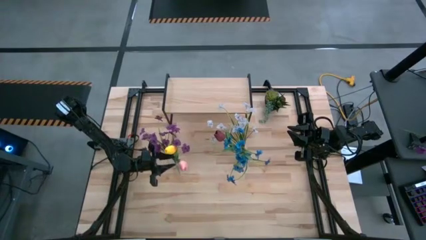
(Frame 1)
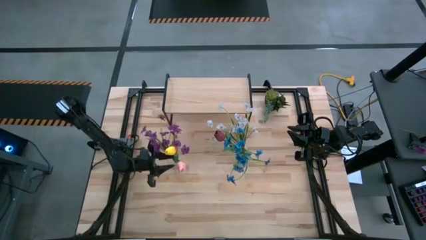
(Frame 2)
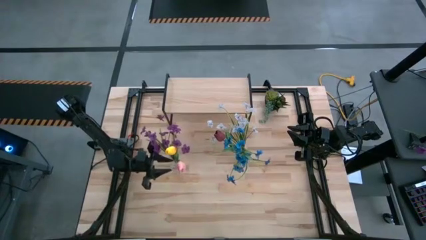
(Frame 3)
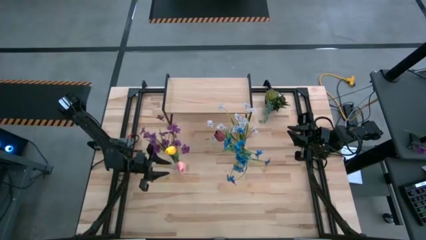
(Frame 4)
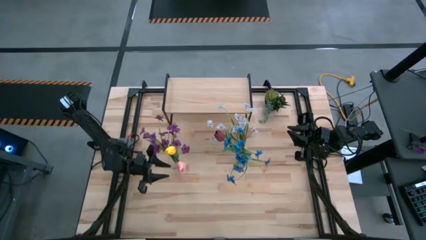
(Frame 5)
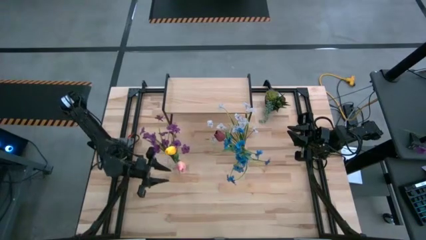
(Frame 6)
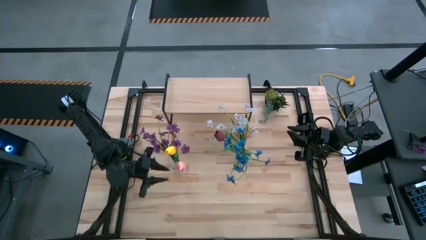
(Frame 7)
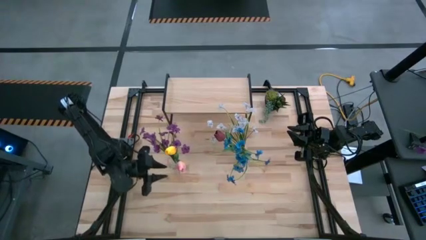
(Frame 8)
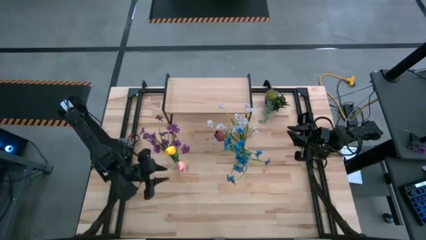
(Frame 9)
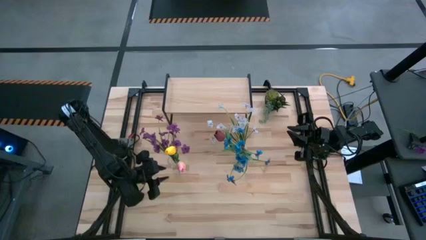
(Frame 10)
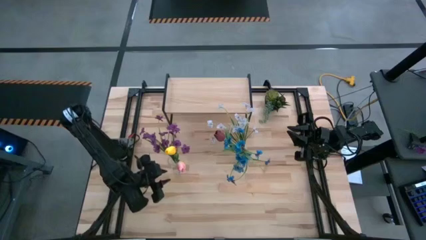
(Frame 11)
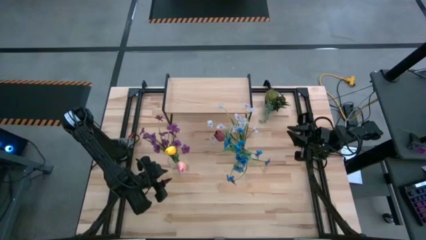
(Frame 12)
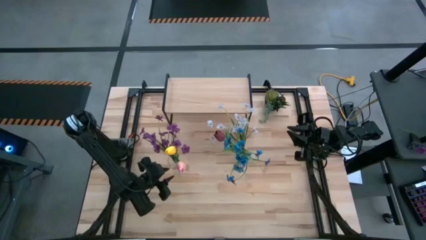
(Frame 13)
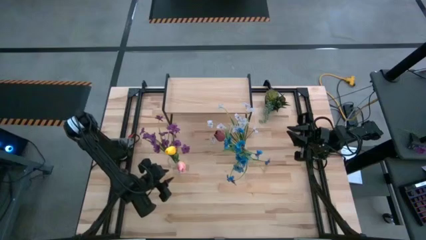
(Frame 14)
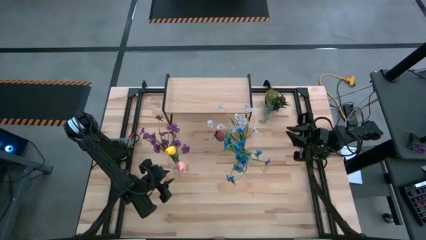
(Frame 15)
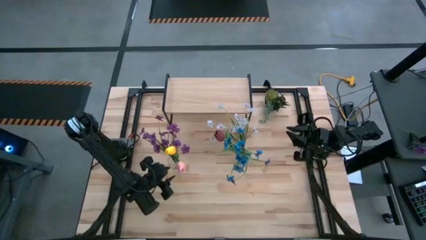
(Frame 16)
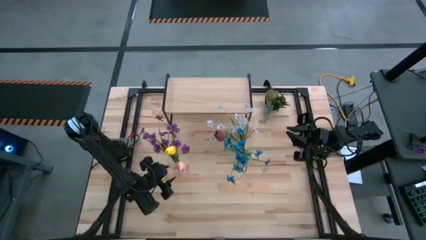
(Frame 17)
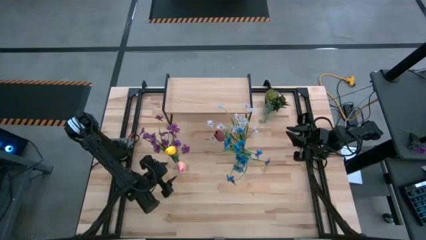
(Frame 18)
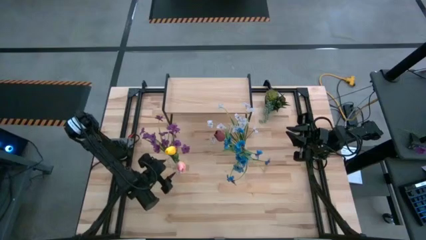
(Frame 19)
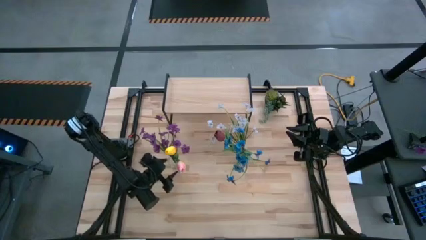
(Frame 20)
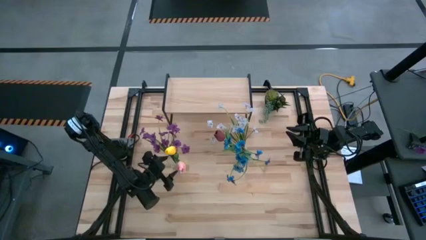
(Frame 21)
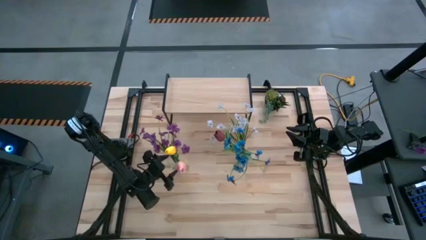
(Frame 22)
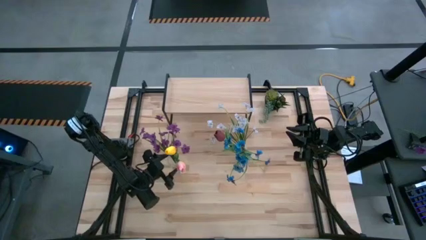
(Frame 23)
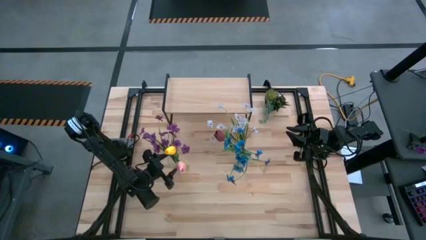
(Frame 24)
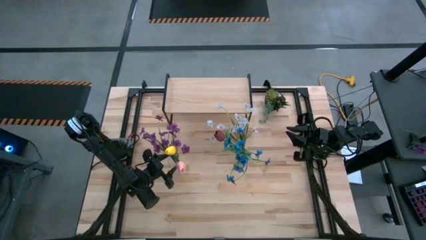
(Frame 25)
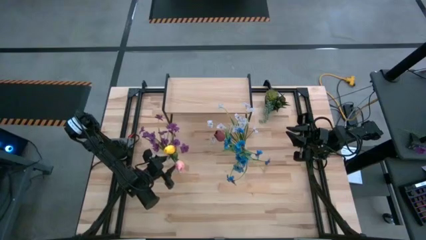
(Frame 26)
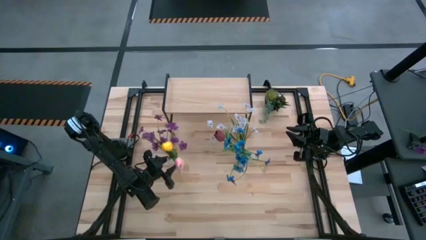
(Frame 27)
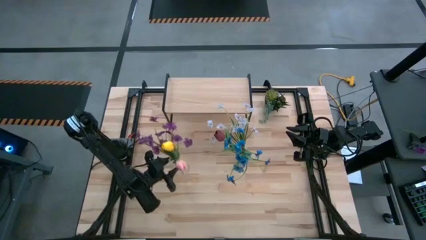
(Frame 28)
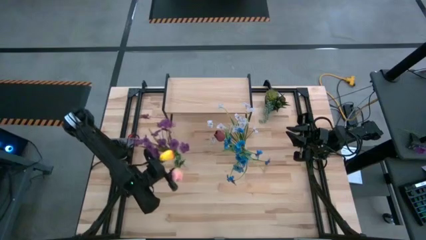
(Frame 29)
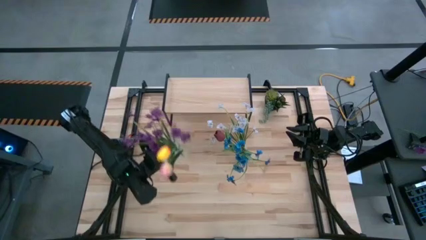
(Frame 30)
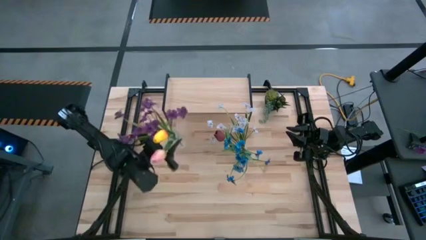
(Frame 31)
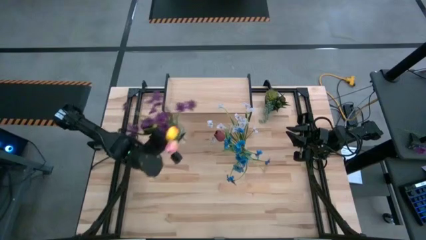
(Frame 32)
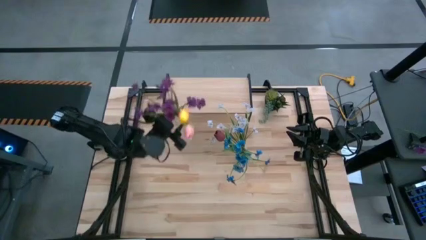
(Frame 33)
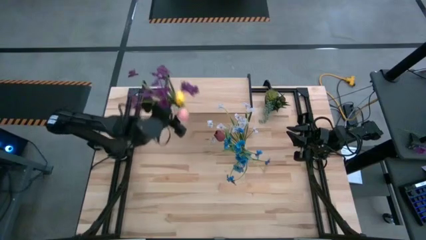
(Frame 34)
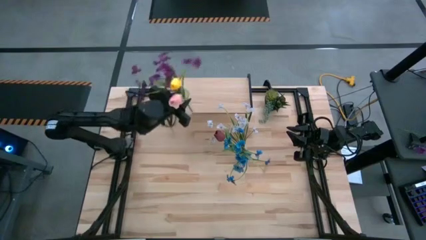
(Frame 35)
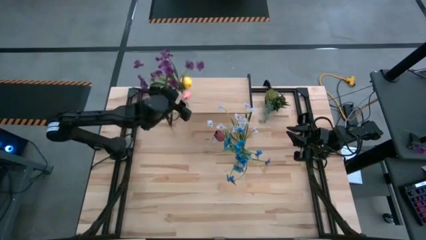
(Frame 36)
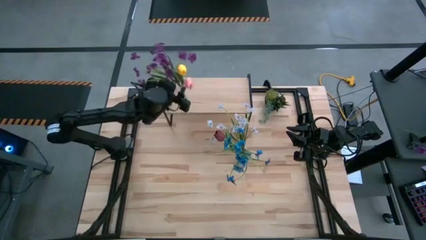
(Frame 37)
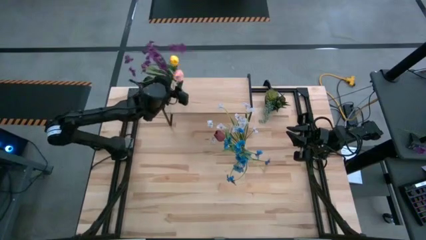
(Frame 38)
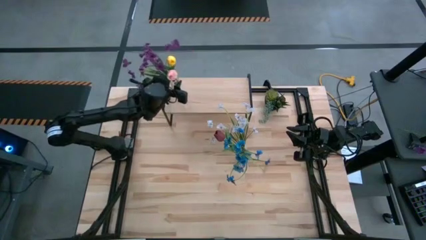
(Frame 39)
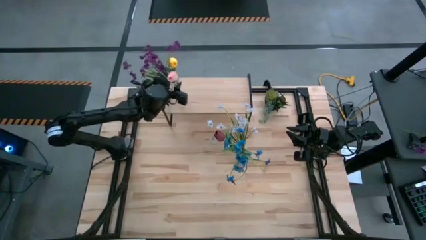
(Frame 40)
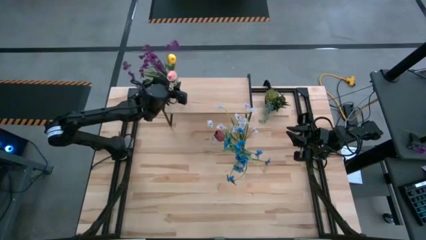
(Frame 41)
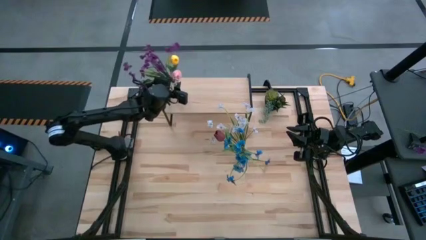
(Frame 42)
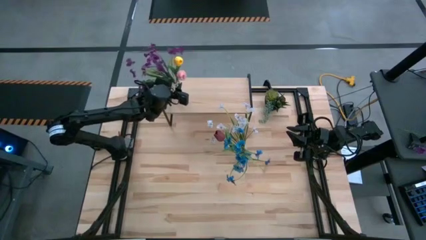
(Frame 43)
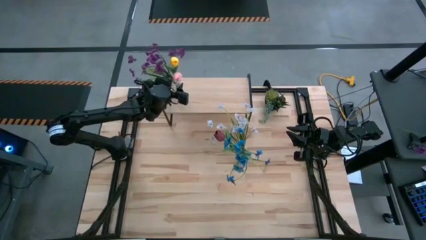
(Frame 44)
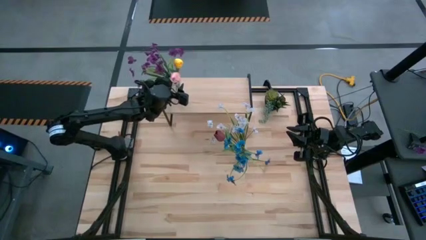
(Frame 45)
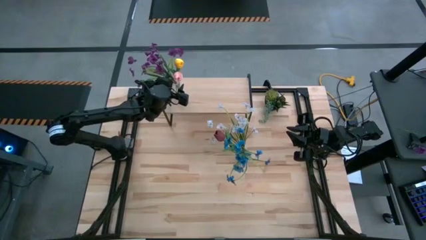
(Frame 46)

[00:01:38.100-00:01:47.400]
Task: Pick and place flowers into a vace then onto a shelf
Put the left crystal vase on the shelf

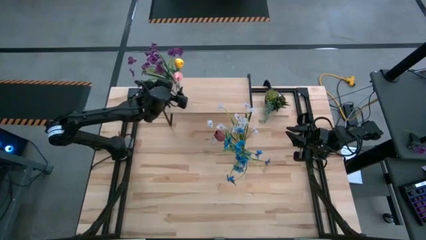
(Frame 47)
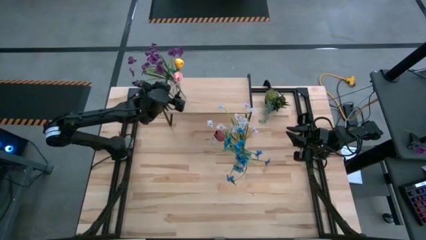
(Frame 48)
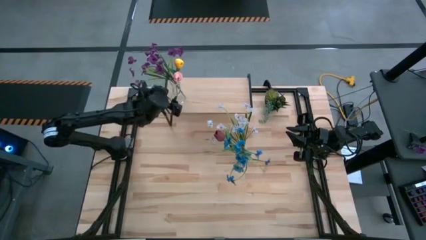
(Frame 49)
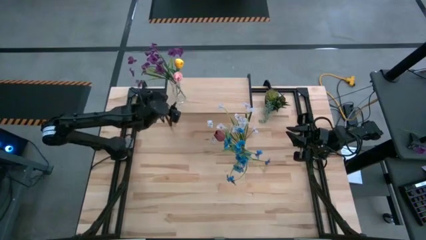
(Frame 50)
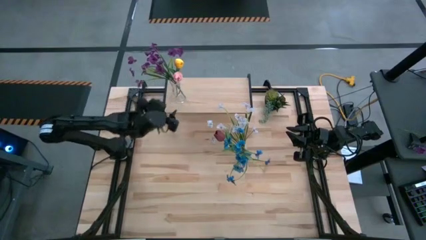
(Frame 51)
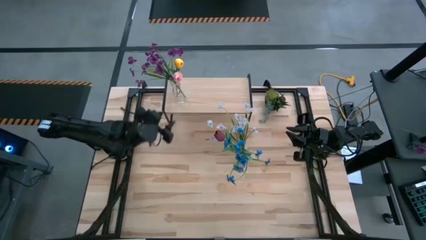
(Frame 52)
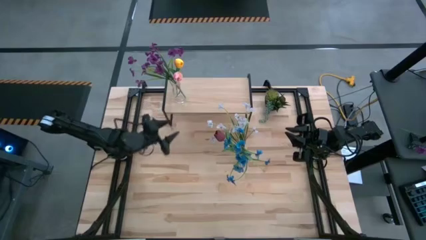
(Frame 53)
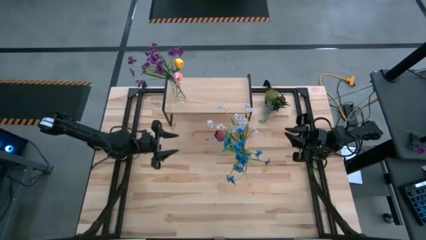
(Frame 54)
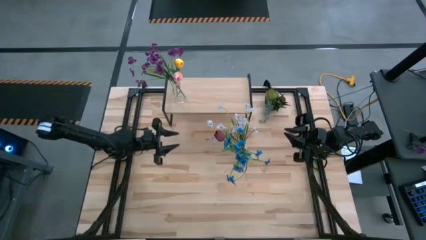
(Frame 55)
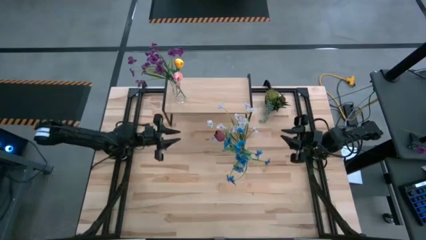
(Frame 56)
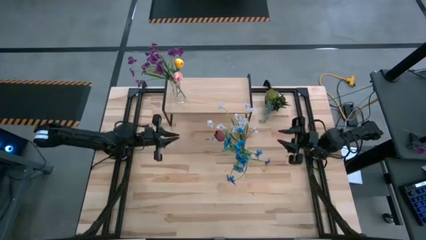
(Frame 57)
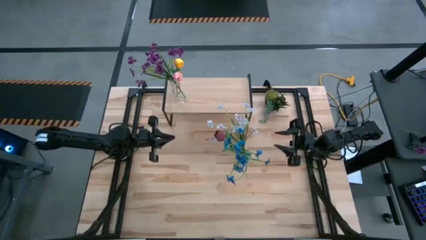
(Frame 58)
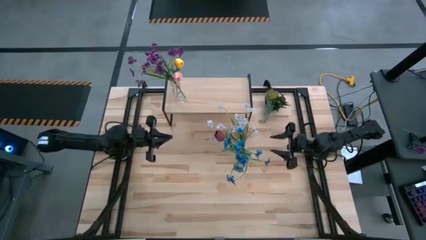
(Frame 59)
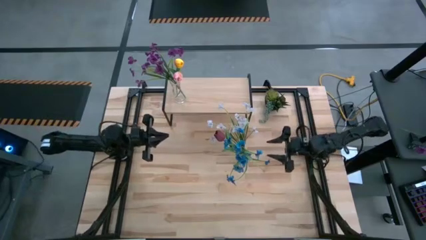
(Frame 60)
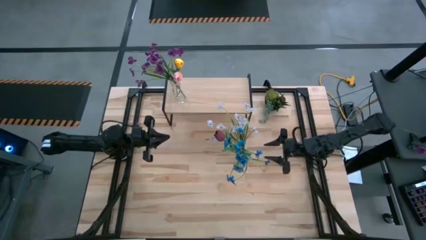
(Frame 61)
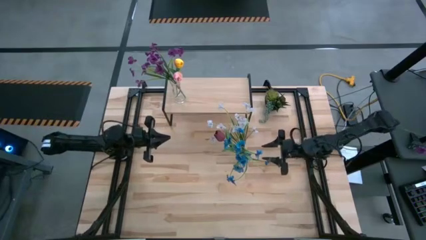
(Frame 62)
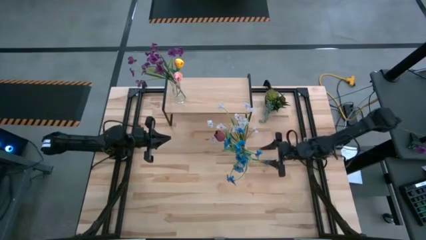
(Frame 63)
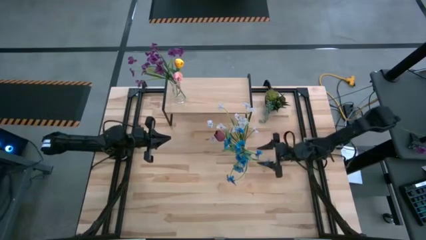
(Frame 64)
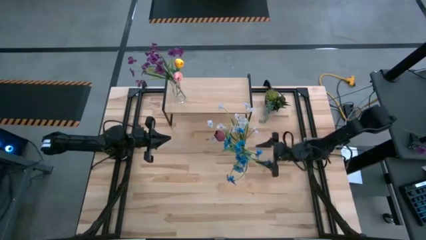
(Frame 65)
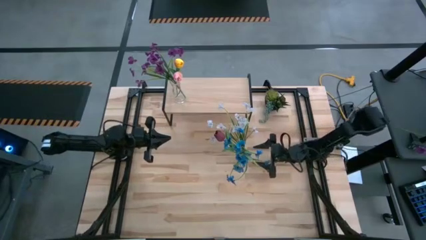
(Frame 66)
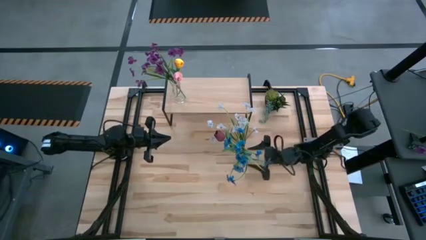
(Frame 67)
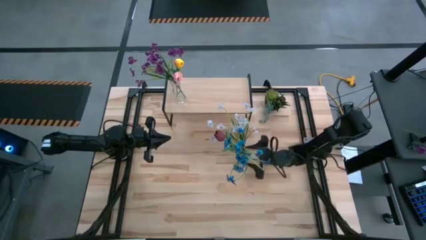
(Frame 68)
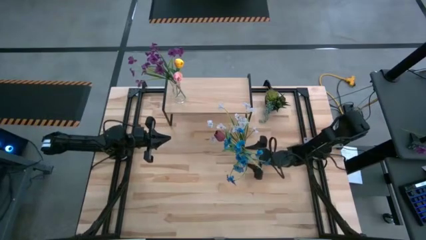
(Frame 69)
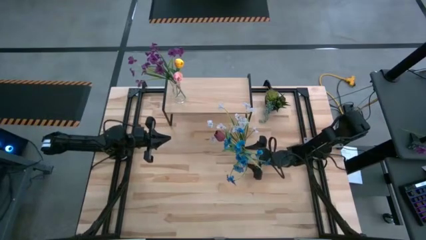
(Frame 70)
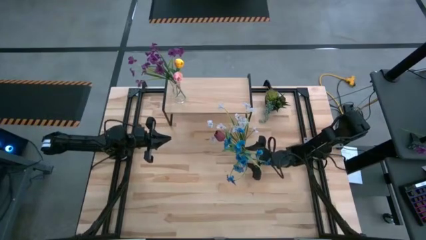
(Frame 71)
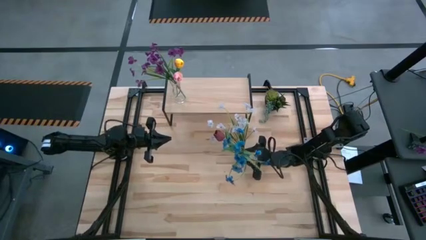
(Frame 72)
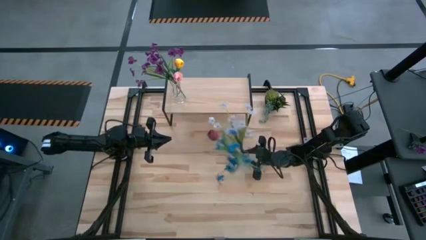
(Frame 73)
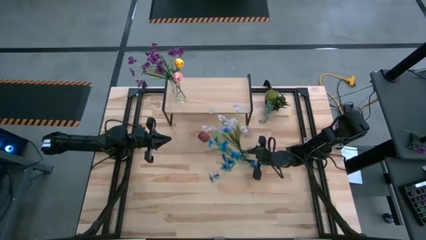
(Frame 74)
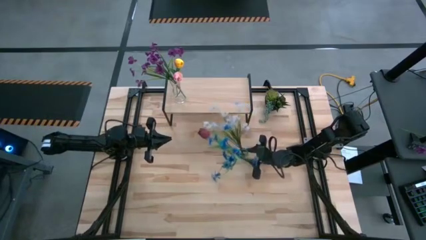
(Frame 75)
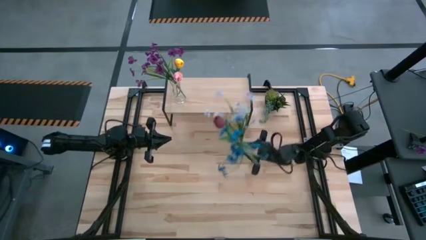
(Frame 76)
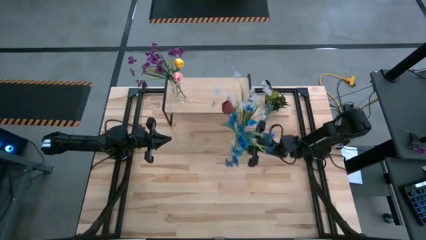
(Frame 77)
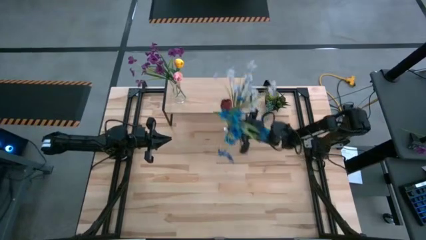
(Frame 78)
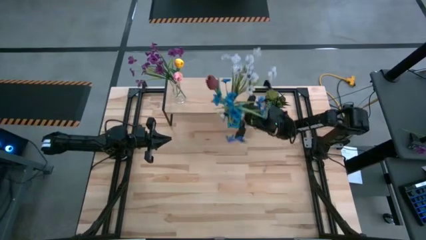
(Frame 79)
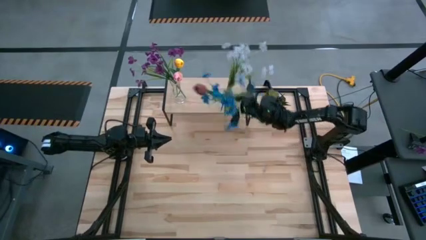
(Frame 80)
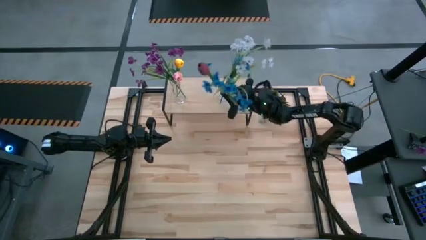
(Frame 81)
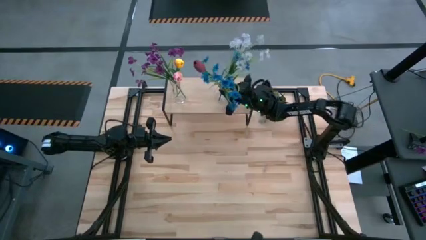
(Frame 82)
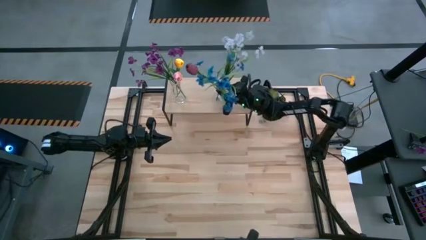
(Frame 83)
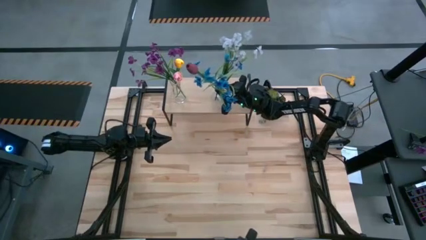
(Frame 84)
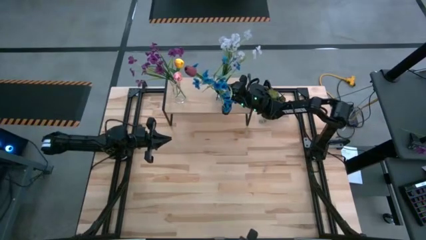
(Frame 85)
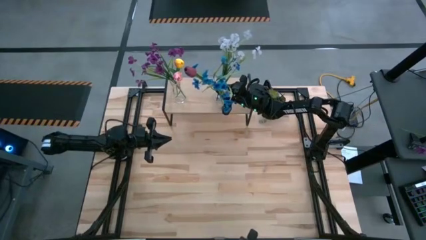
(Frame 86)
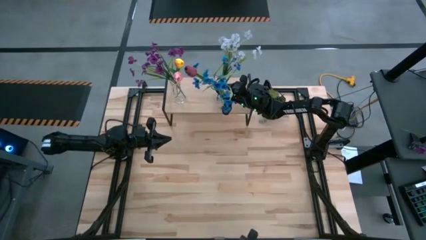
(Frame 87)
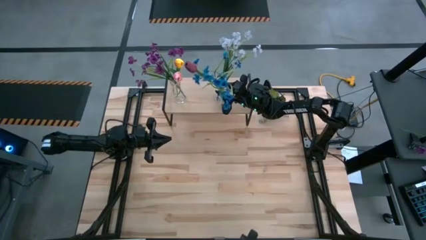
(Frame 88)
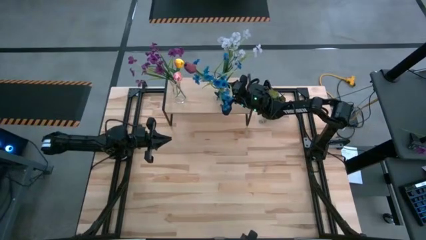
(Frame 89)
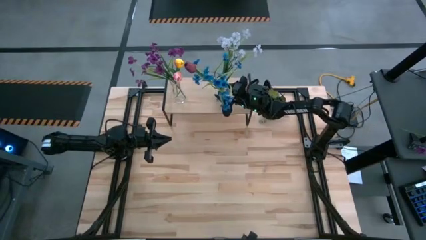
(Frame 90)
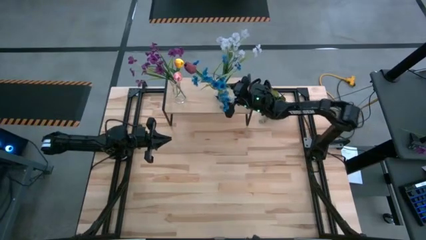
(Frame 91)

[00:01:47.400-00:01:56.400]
Put the right crystal vase on the shelf
